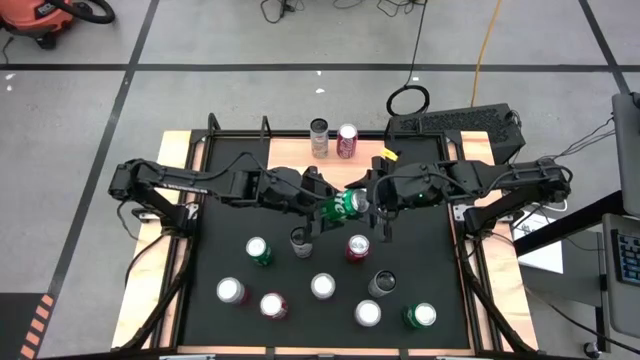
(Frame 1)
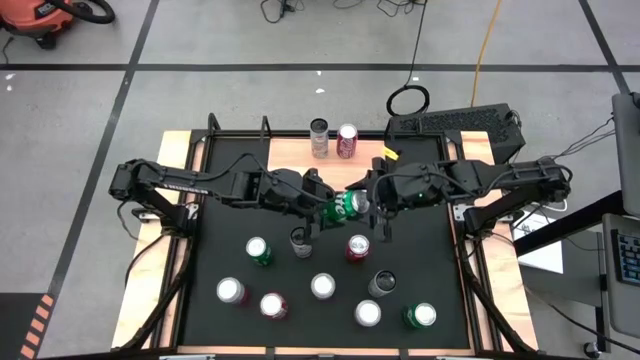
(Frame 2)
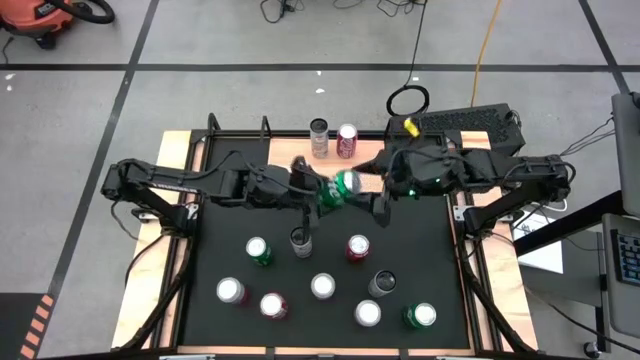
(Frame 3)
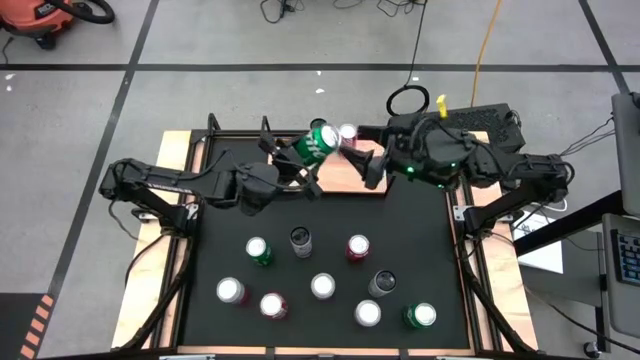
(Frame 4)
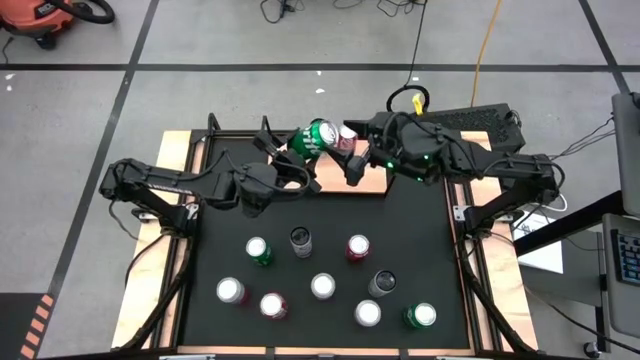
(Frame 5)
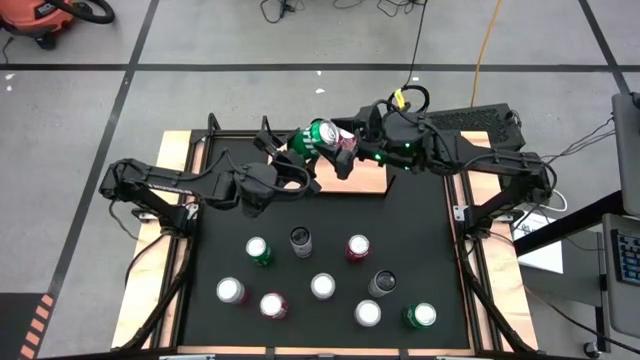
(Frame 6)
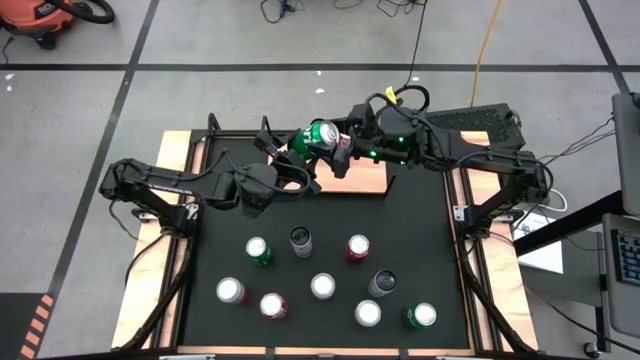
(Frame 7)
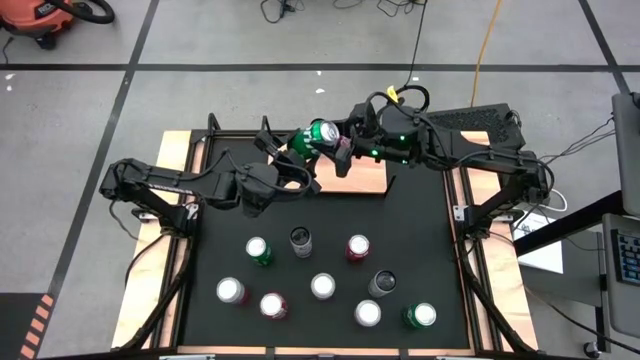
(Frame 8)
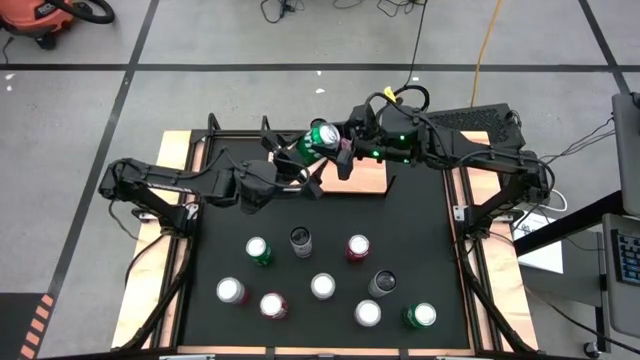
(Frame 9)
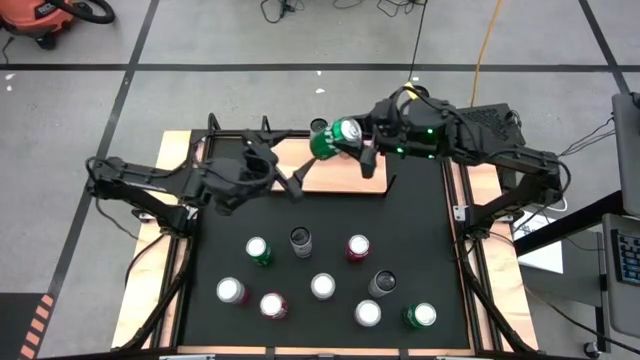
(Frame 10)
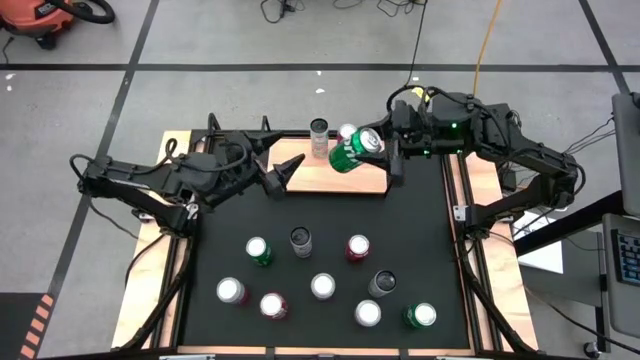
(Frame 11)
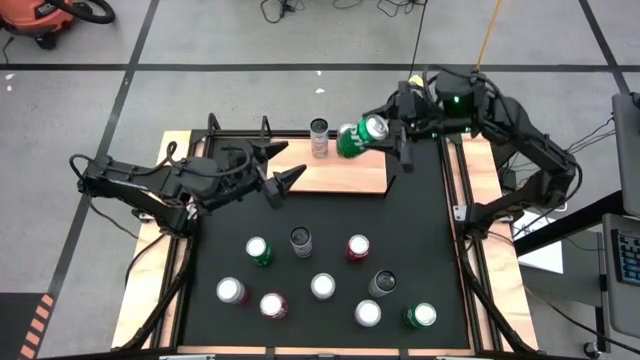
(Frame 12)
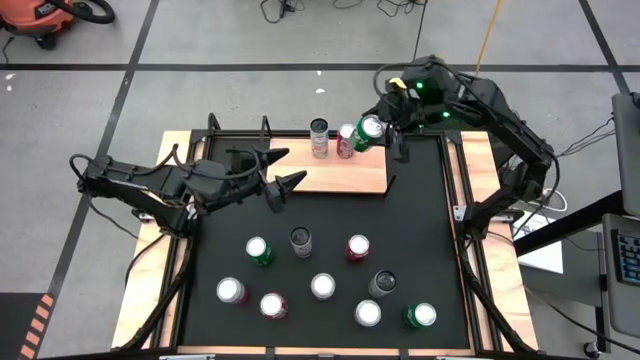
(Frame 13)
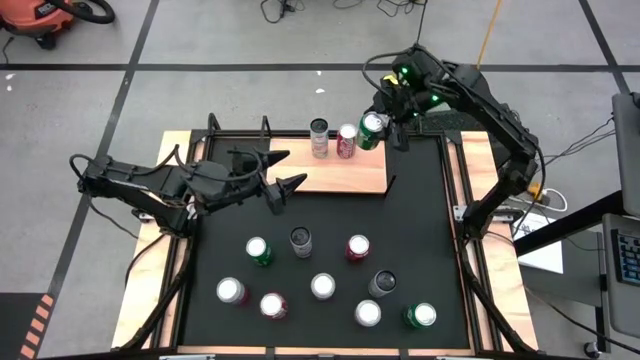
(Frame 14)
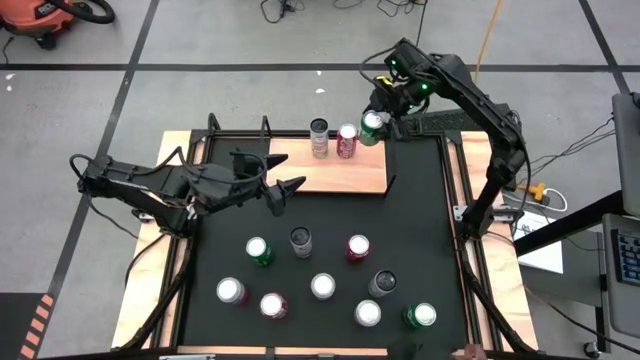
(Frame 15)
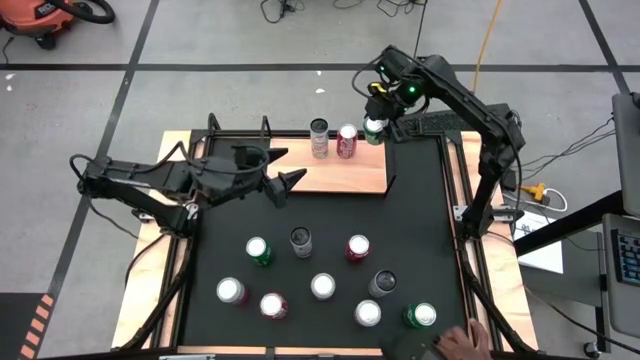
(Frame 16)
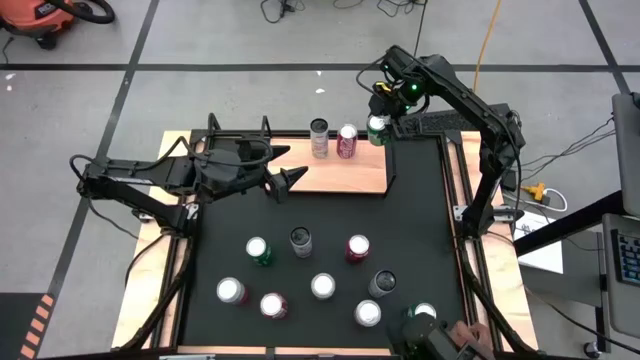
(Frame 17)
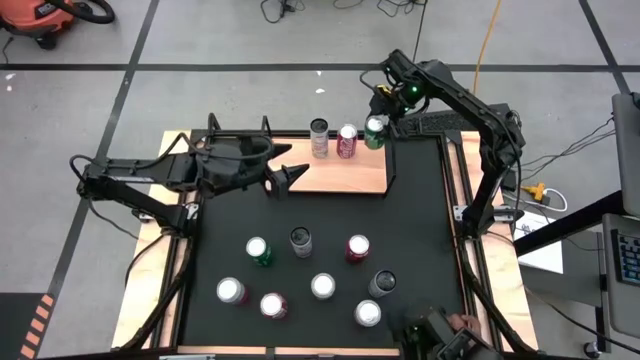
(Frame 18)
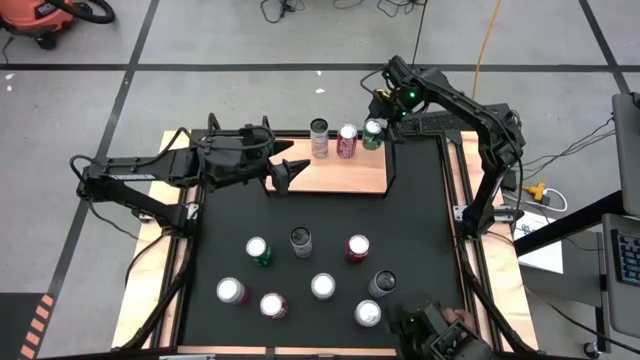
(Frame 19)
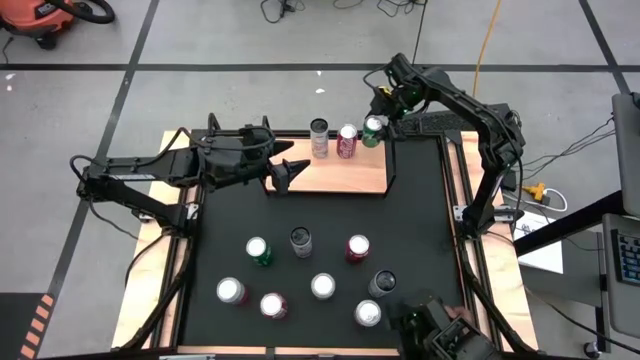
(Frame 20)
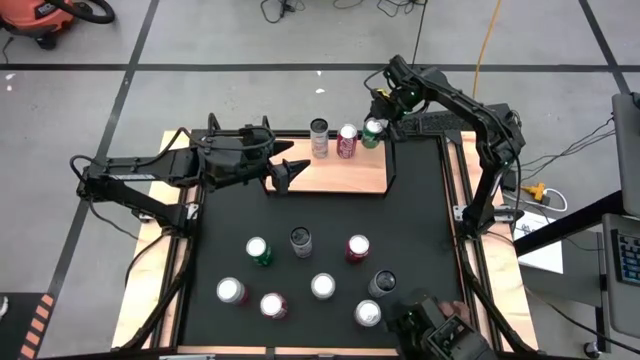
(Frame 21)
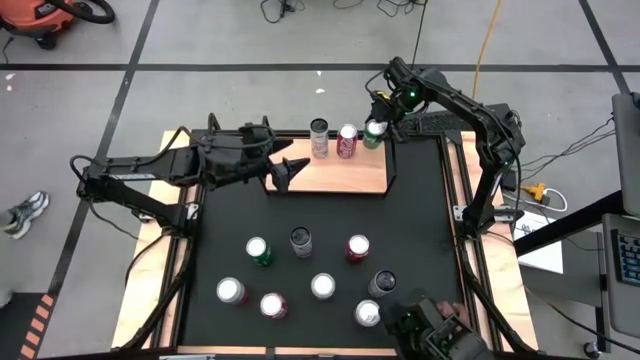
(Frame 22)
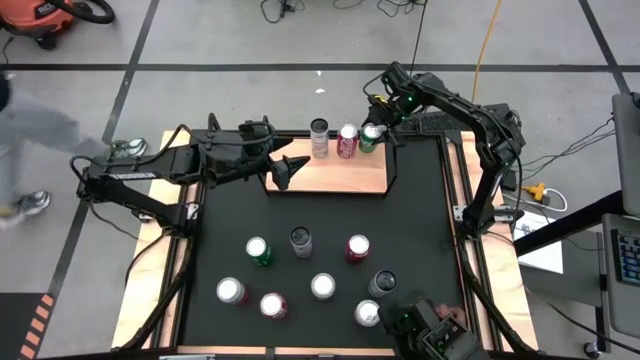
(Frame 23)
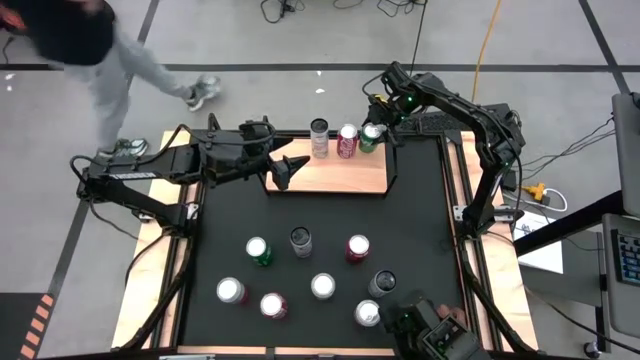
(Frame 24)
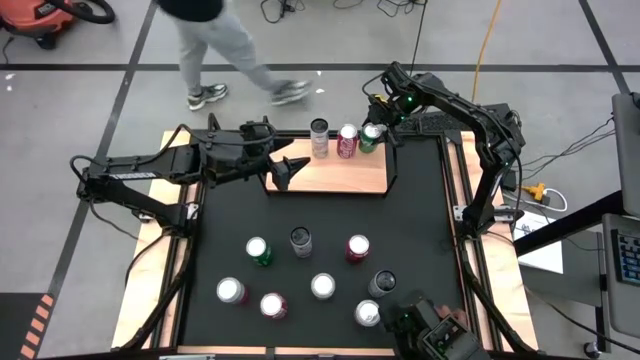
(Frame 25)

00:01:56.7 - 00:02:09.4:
Task: Place canned beverage on shelf
Put the top right green soda can on the shelf

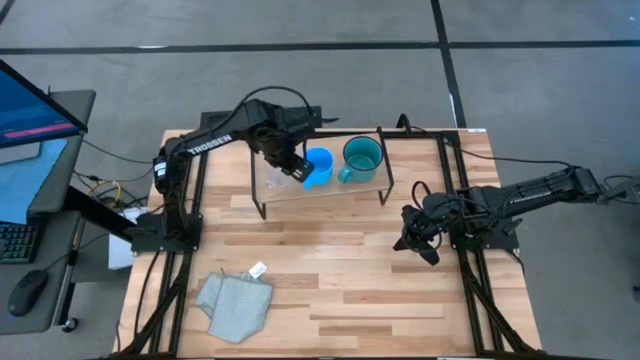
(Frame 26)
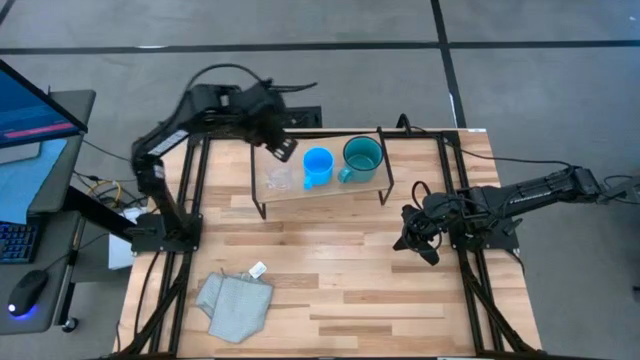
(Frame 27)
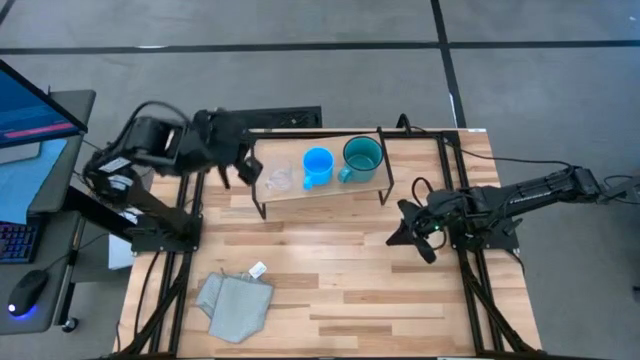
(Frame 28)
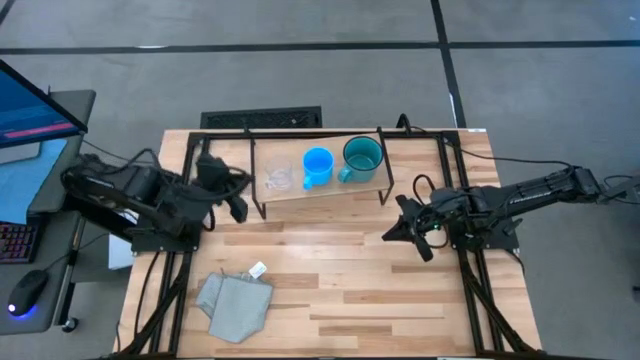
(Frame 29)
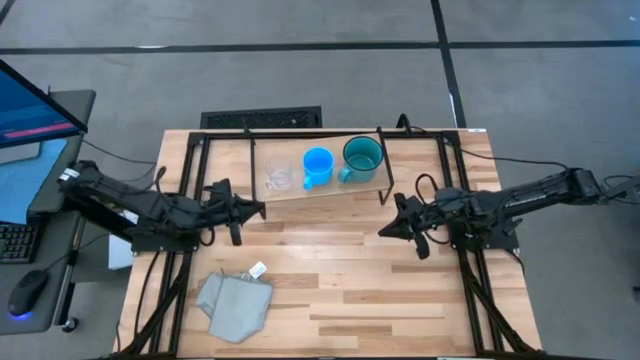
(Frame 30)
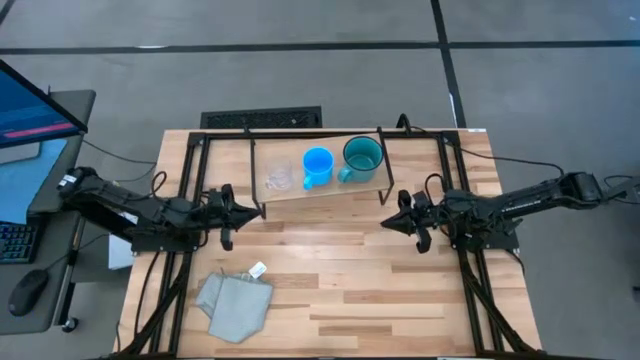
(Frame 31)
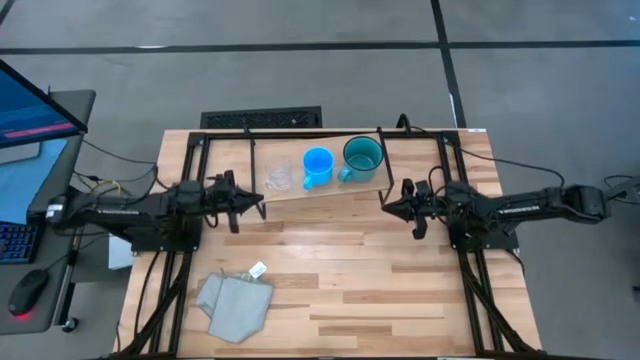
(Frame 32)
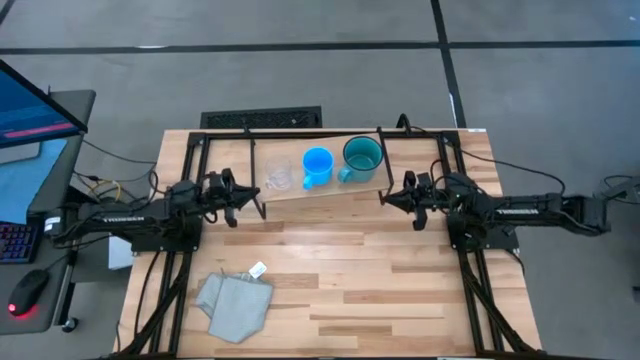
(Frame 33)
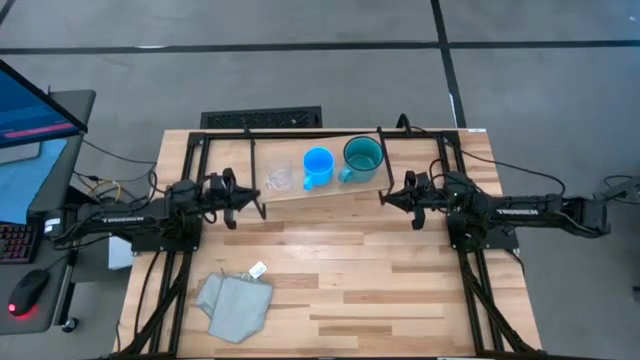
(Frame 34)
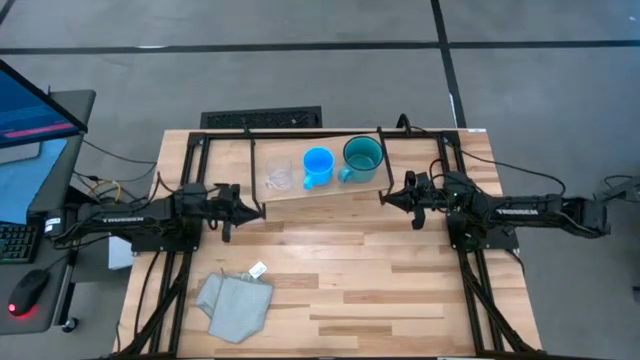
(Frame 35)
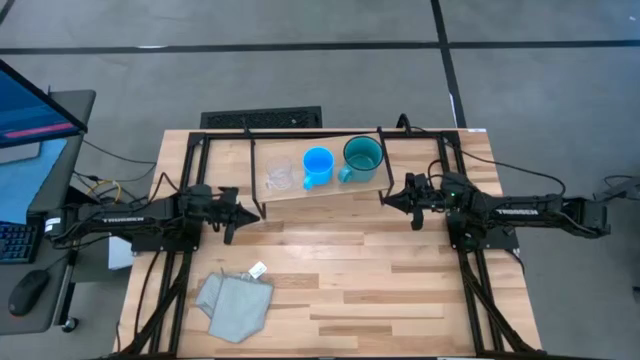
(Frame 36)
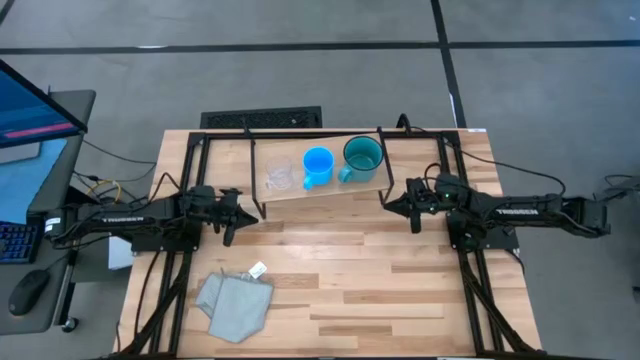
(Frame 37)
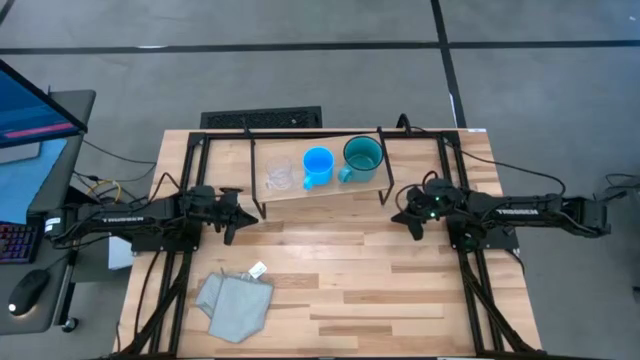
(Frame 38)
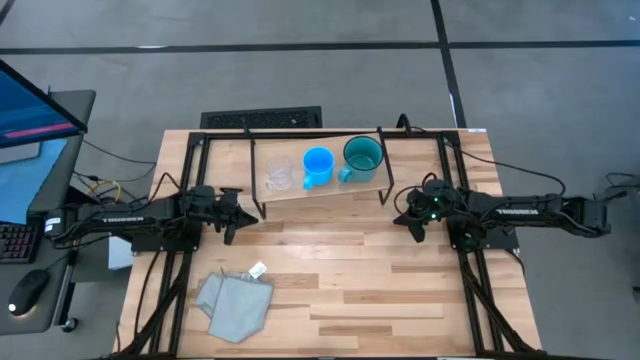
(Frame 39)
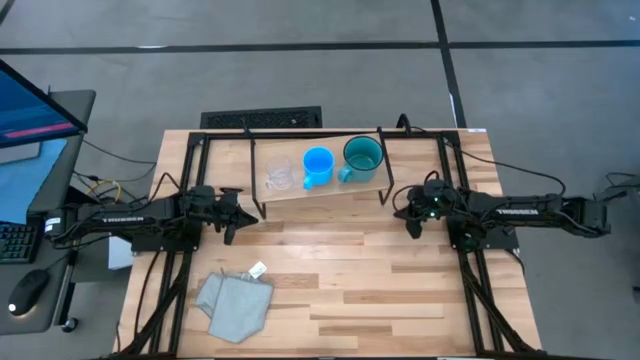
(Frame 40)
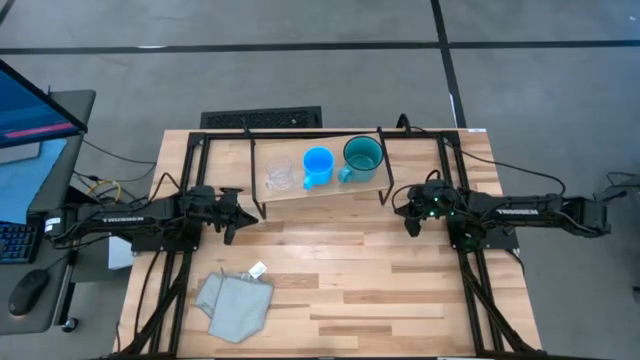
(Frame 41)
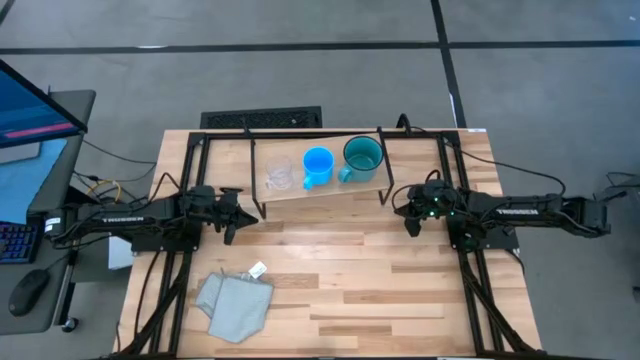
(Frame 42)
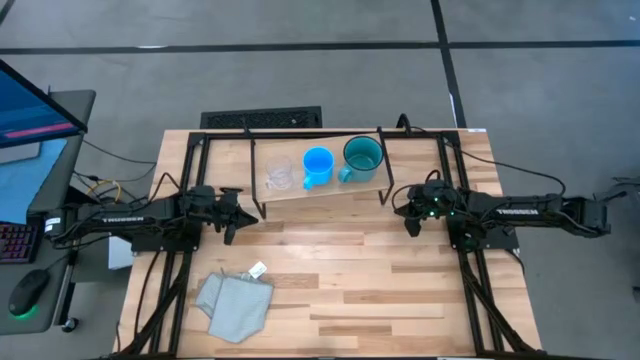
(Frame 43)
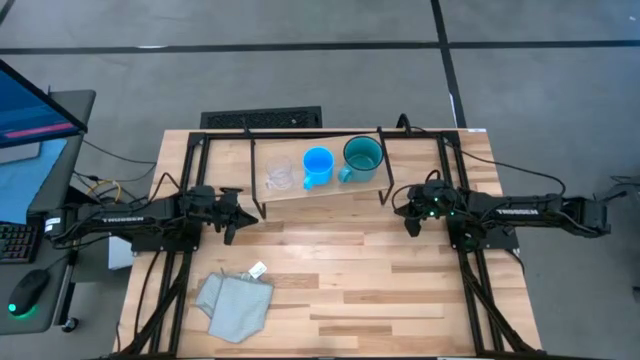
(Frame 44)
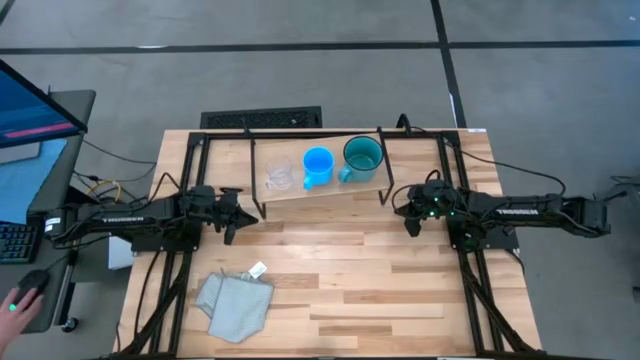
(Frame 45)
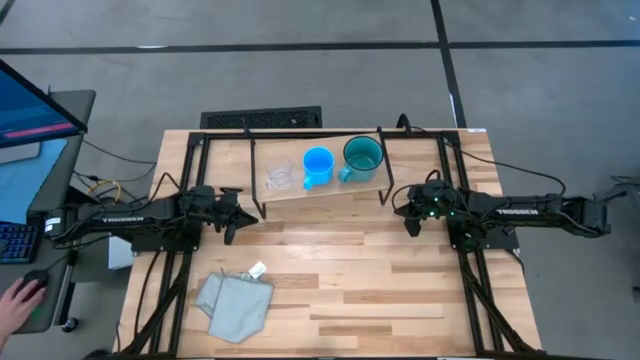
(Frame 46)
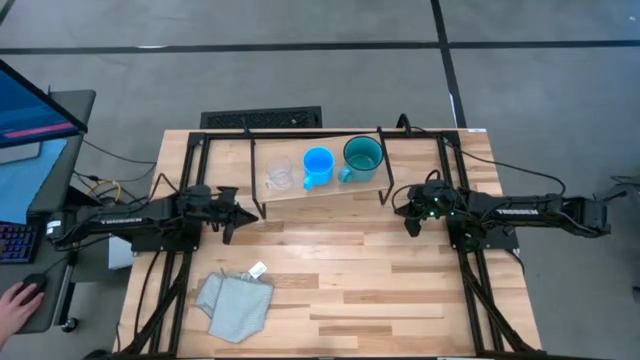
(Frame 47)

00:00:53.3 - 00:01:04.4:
Task: Stack small to large cups/mugs on shelf
Return to Home Position
